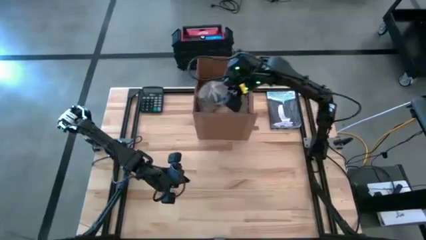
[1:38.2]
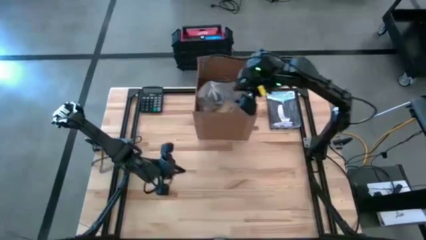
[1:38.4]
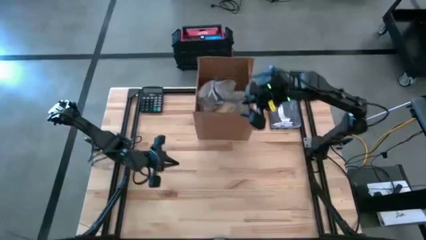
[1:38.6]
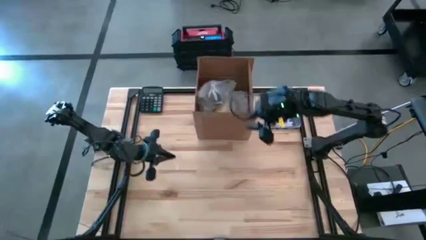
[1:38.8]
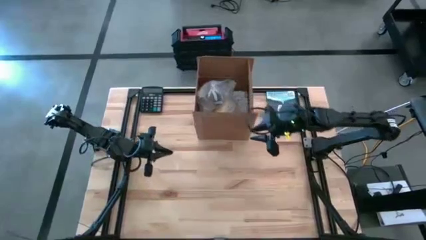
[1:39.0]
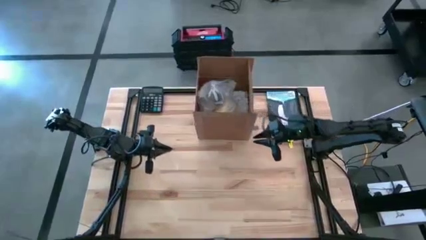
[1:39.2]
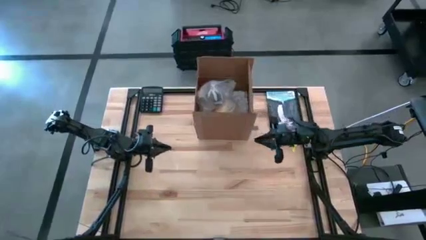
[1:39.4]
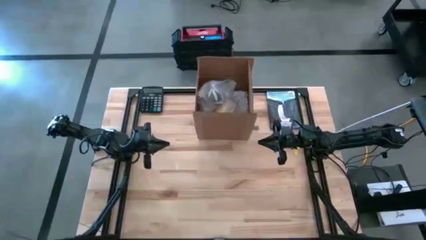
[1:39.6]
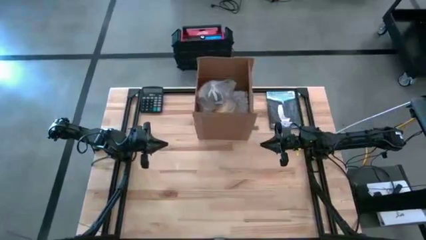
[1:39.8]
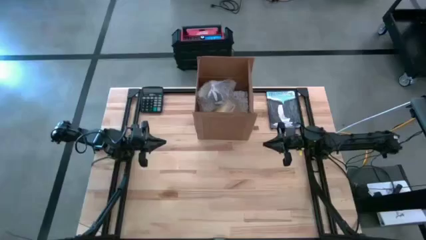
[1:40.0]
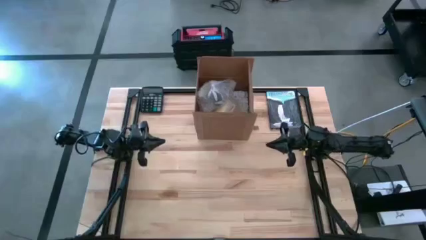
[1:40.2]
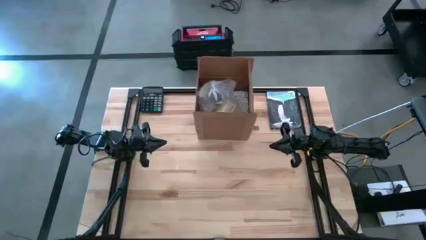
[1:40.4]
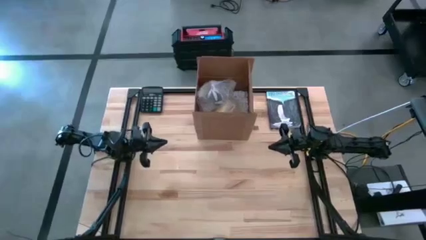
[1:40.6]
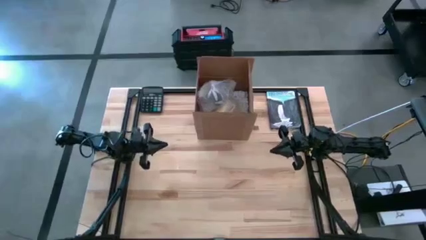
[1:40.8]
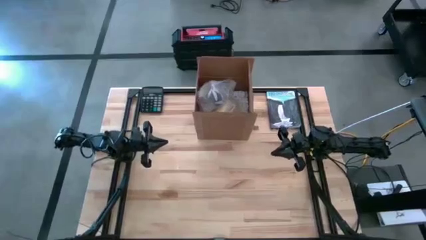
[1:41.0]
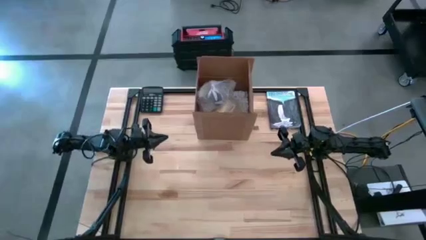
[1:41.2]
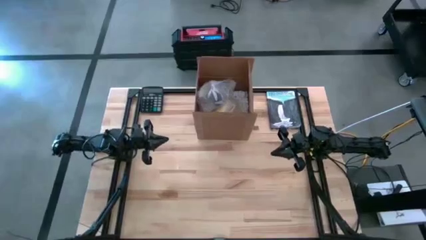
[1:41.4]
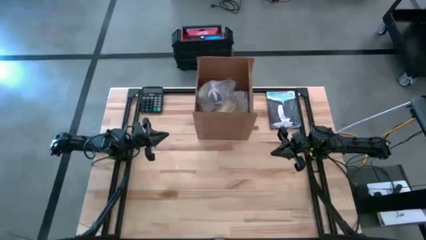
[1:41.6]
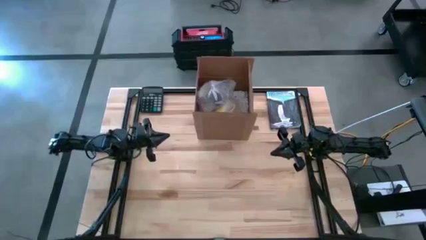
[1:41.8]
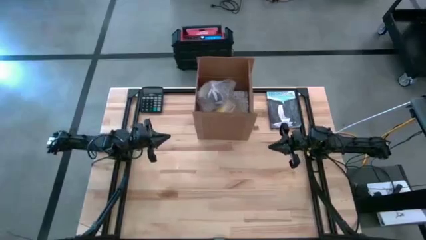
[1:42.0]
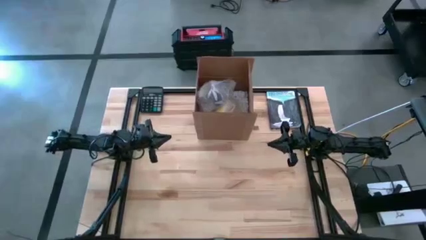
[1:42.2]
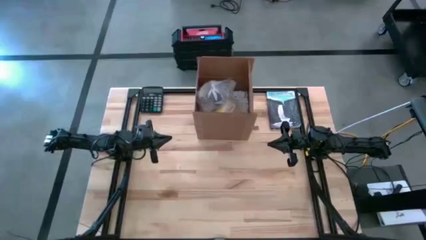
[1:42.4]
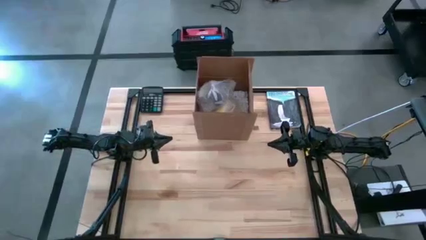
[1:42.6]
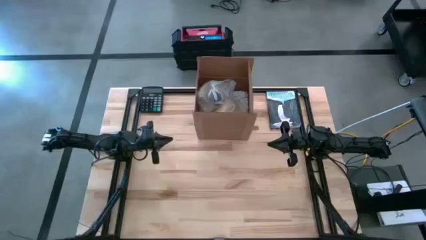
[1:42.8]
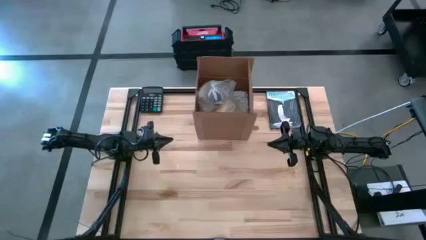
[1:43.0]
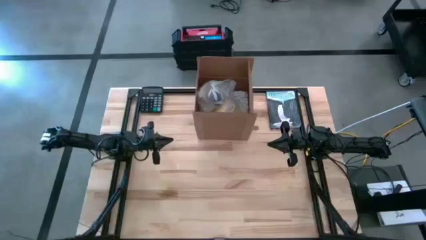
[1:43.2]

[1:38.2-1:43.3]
Task: wrap mug
Return to Home Position

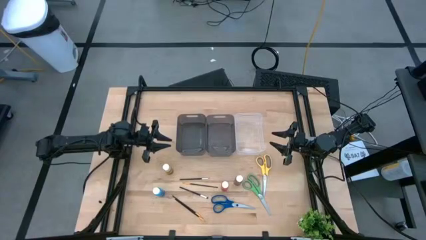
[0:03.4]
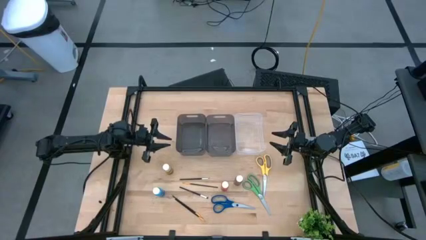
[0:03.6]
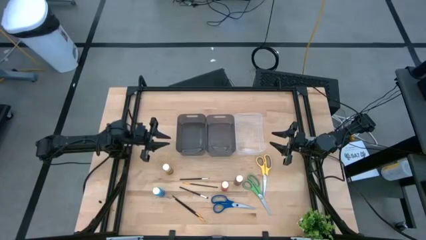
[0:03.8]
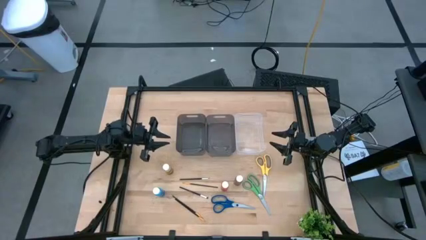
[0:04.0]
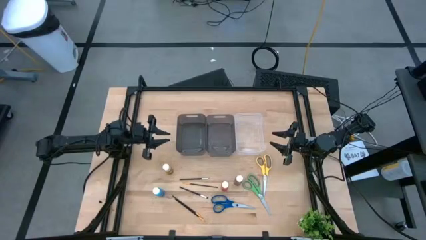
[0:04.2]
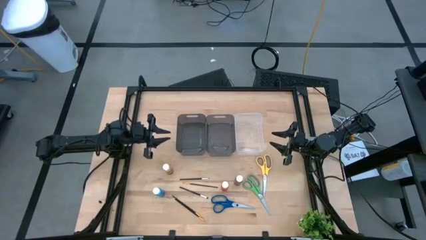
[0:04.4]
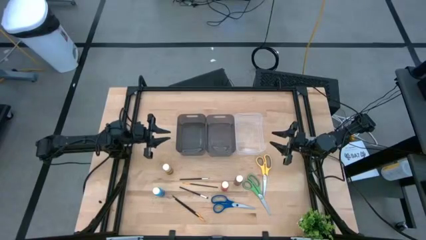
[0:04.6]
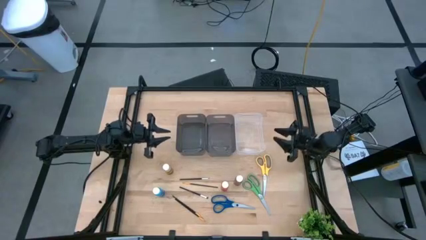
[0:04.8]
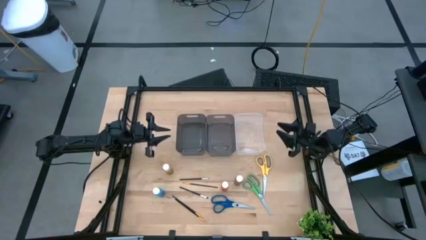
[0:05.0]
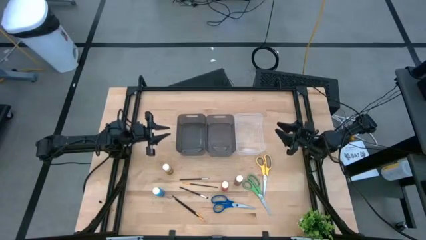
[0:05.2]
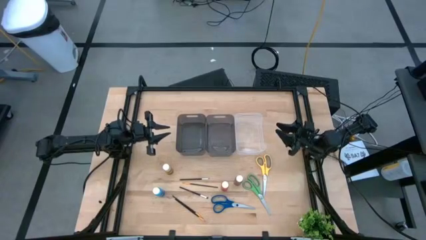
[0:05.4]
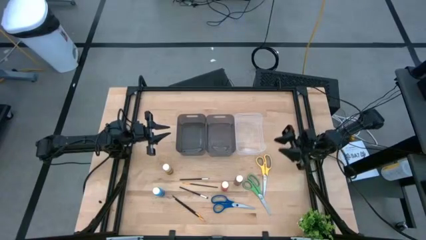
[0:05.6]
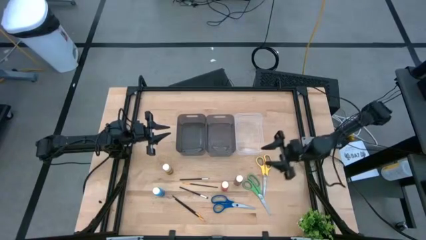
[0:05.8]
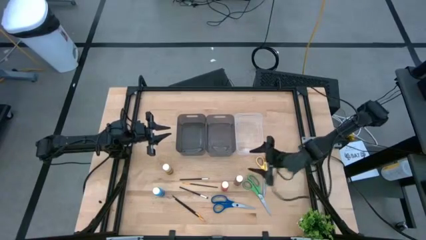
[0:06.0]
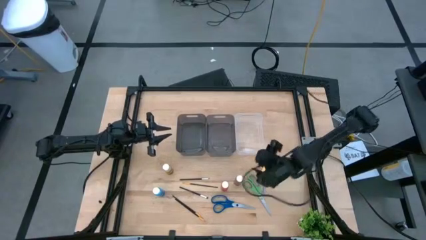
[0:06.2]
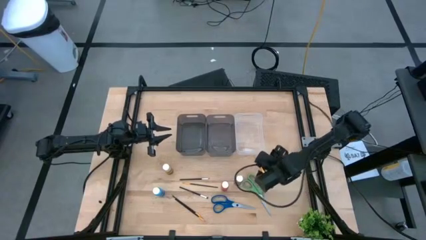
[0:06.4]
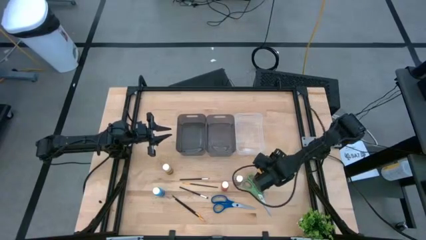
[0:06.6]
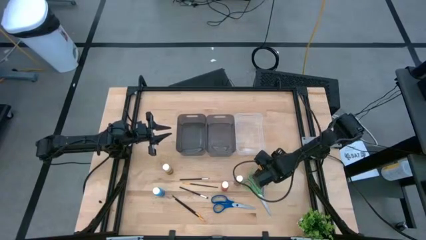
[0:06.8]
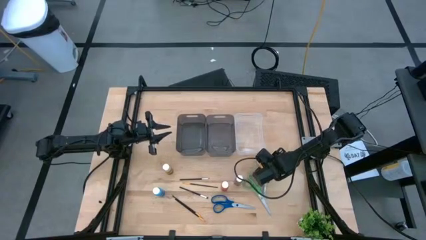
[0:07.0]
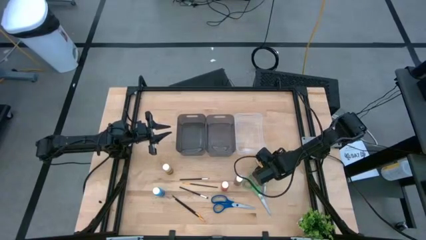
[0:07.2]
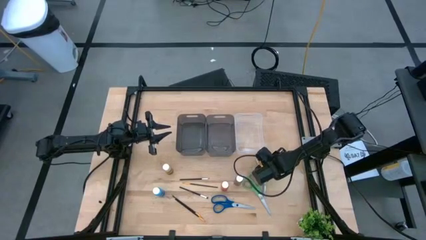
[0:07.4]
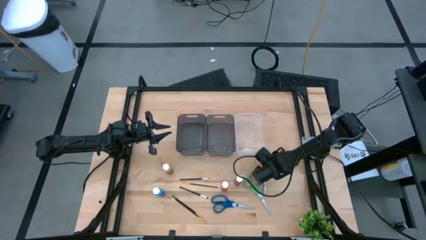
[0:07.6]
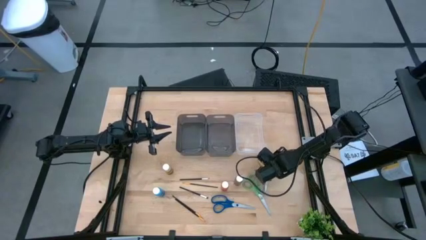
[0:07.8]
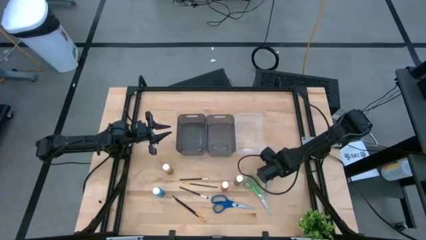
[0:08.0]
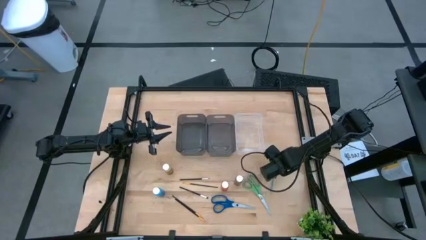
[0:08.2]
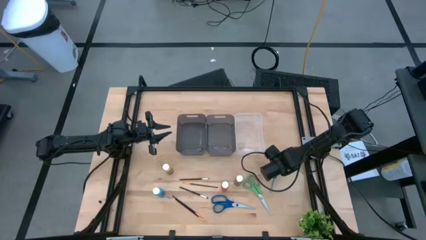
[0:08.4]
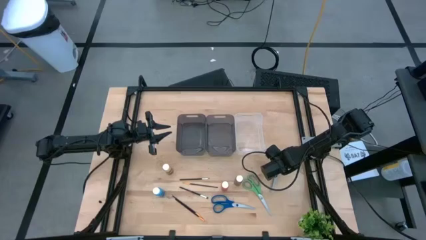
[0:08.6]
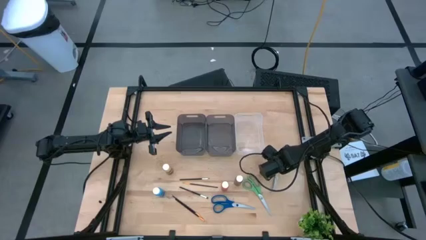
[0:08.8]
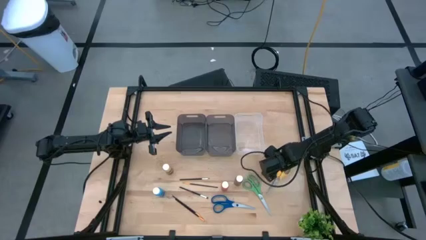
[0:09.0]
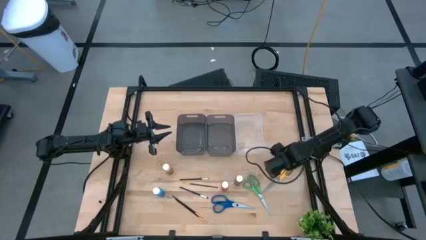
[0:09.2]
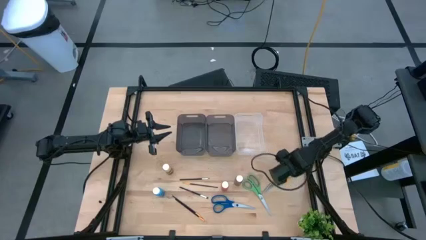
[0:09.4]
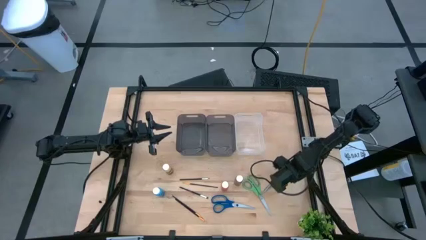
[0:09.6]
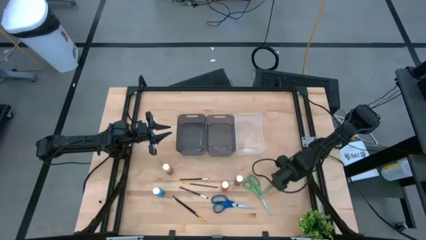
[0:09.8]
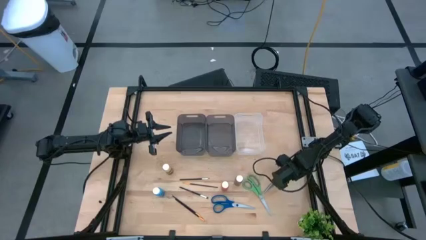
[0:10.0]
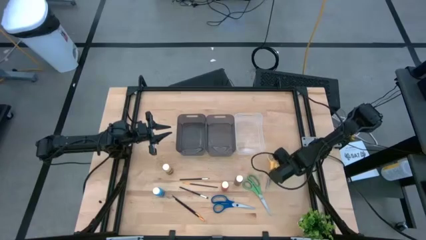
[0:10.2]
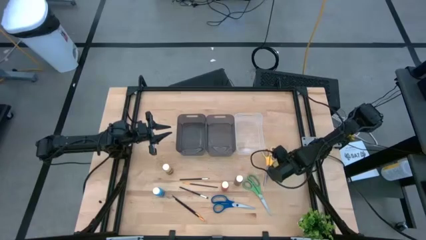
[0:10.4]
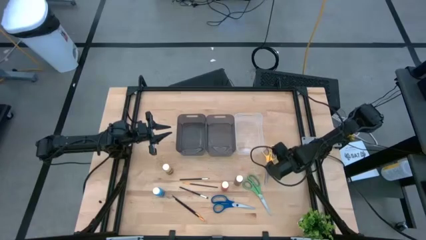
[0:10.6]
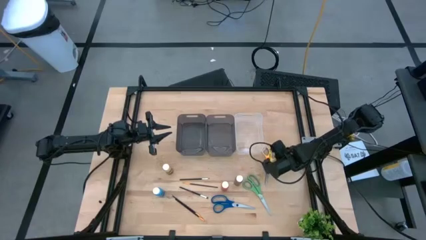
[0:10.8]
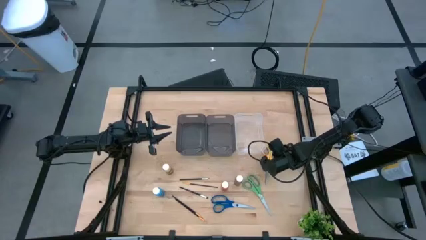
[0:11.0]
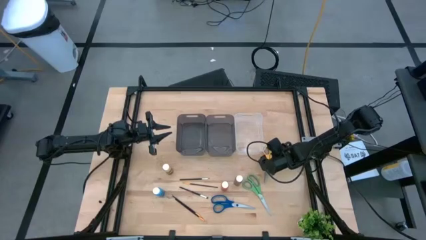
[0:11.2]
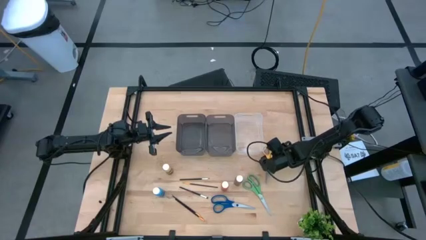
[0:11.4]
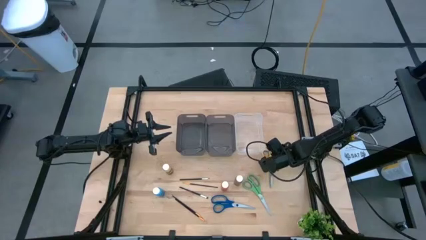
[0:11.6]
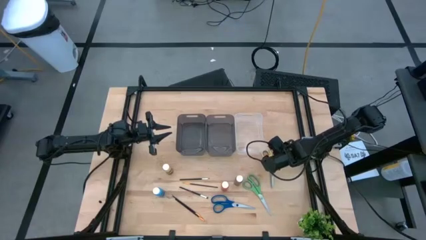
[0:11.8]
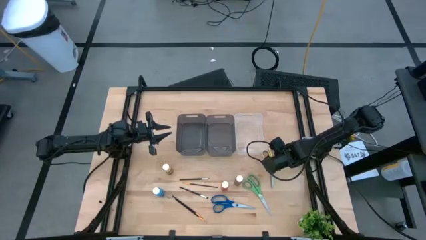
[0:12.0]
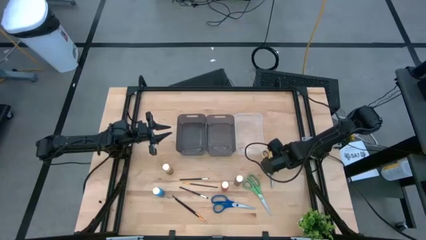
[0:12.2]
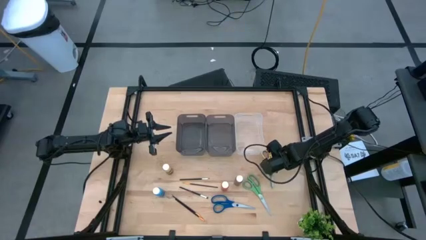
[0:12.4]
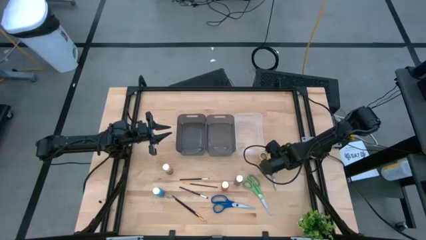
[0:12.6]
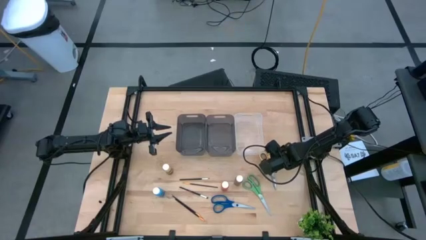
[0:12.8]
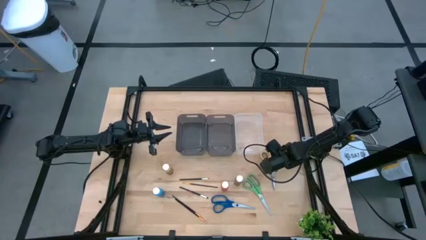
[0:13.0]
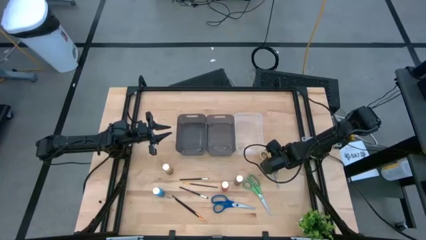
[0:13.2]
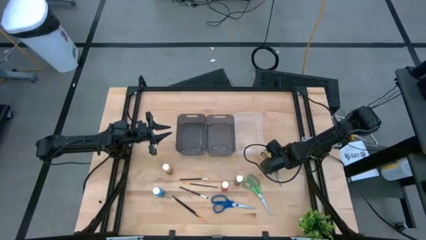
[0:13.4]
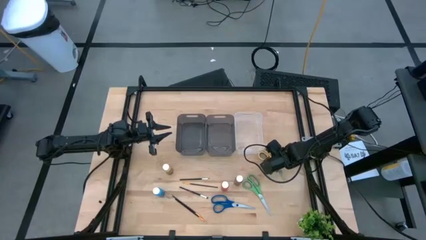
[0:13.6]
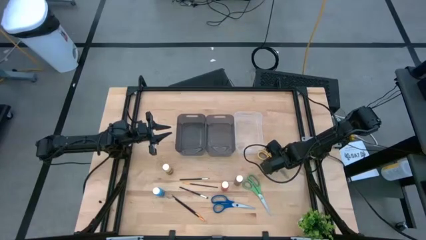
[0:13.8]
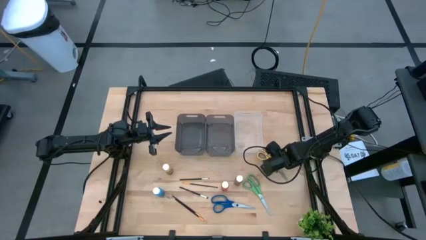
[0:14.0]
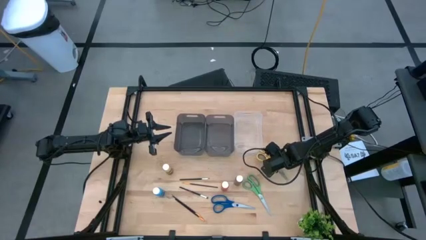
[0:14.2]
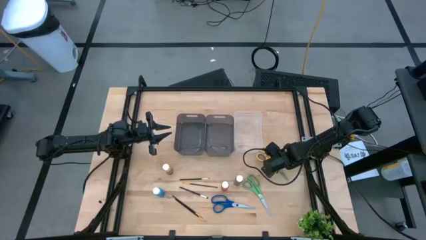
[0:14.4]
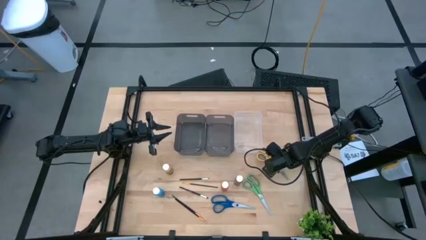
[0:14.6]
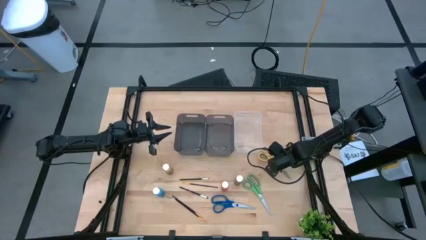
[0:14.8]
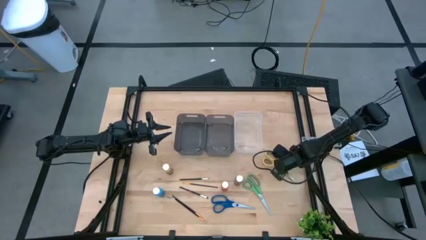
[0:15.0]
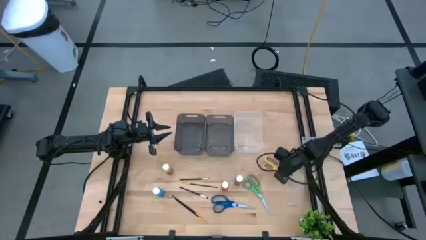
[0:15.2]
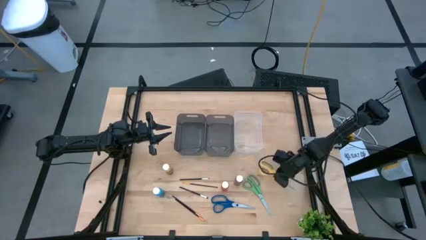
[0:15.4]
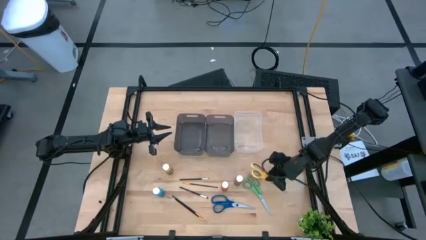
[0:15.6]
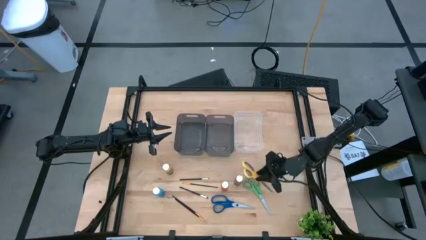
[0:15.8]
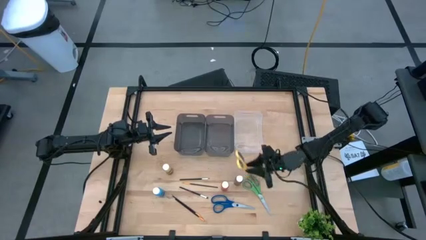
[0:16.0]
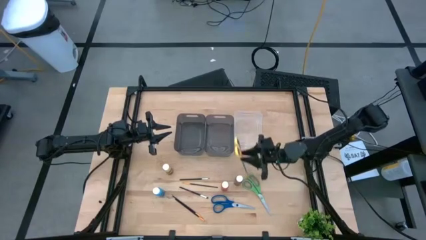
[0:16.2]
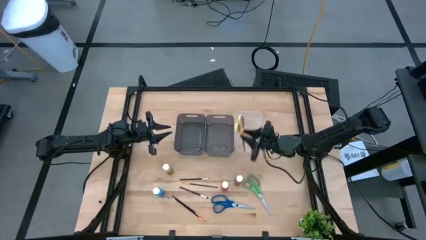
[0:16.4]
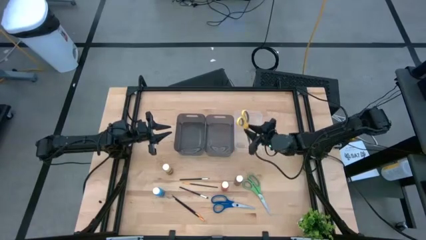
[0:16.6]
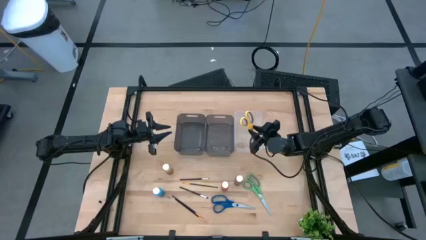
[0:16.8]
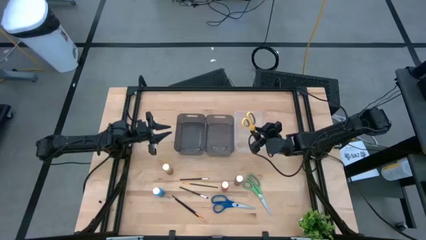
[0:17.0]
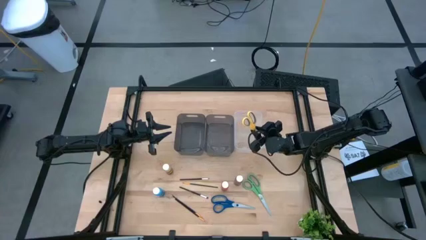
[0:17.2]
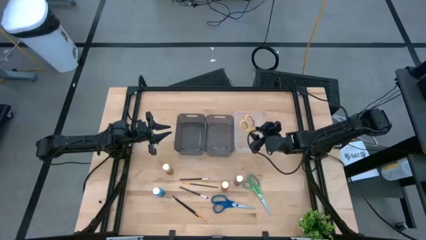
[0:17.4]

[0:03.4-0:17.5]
Task: Pick & Place Paint Supplies
Put the yellow scissors into the transparent bin
